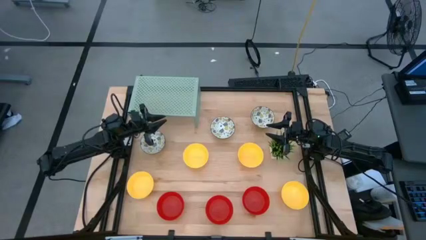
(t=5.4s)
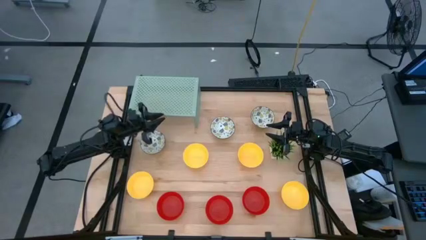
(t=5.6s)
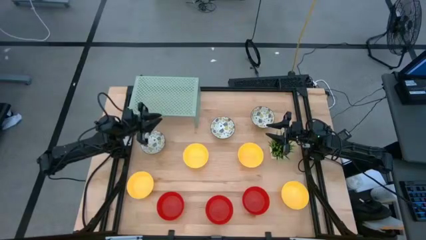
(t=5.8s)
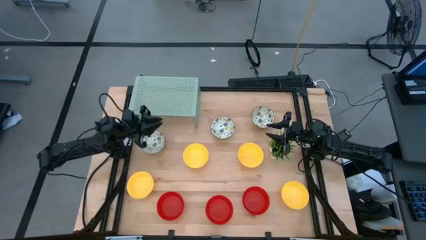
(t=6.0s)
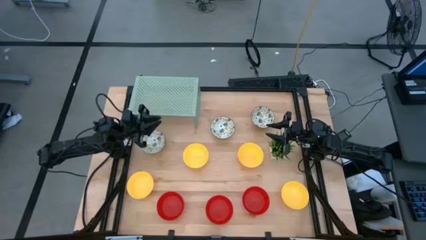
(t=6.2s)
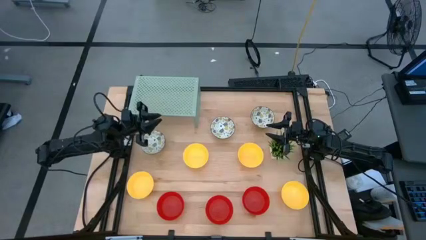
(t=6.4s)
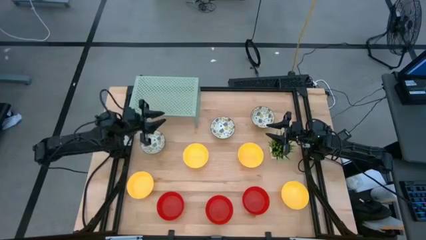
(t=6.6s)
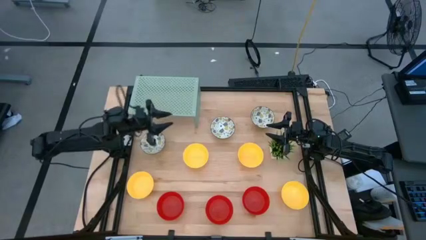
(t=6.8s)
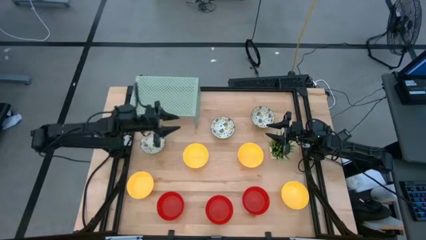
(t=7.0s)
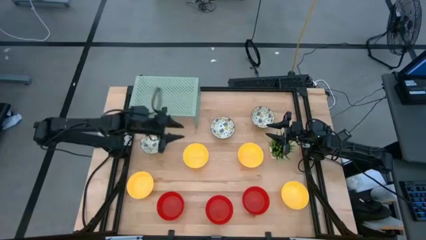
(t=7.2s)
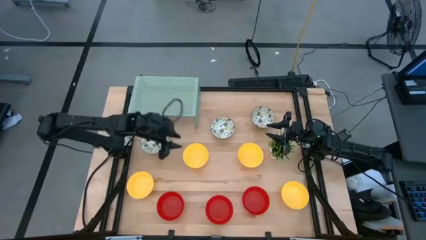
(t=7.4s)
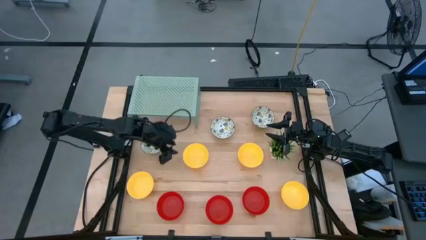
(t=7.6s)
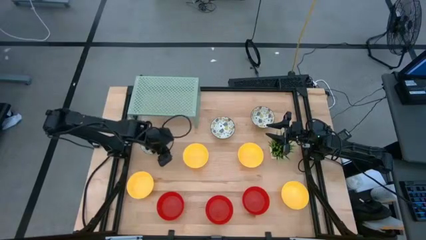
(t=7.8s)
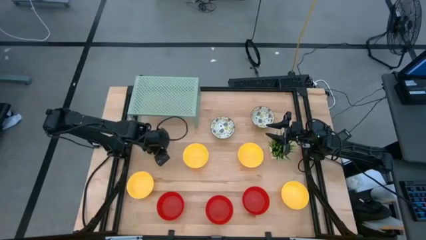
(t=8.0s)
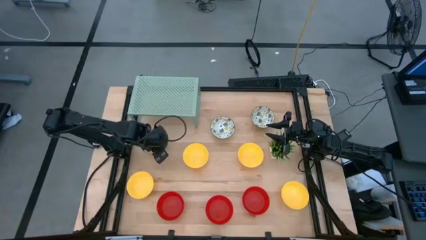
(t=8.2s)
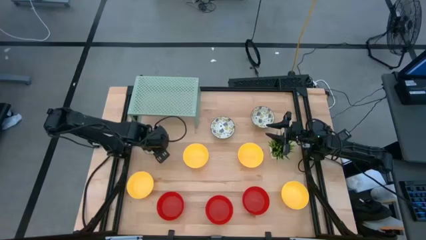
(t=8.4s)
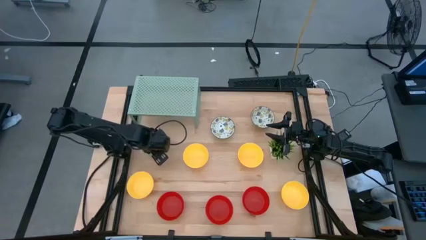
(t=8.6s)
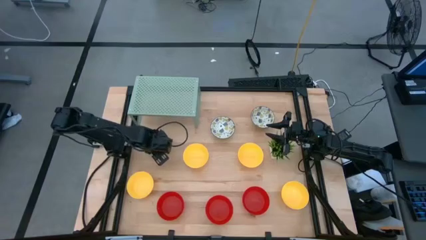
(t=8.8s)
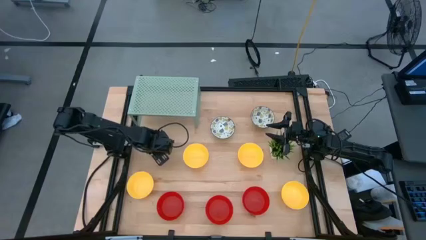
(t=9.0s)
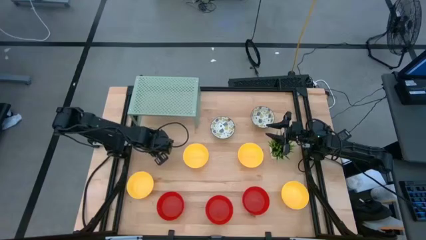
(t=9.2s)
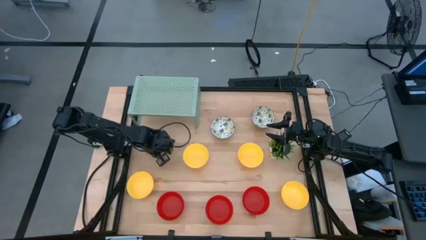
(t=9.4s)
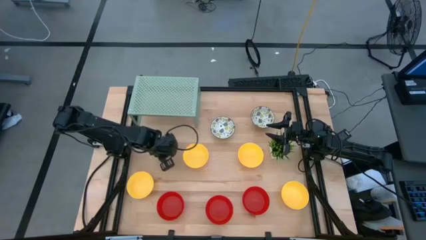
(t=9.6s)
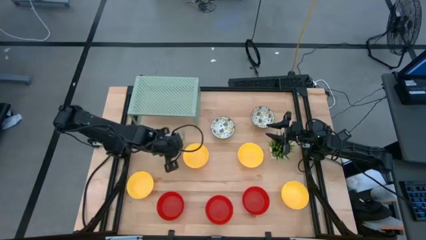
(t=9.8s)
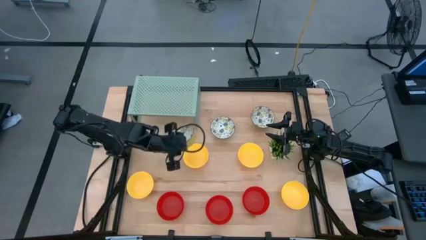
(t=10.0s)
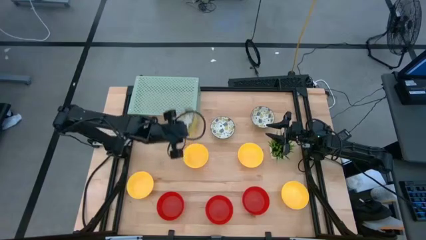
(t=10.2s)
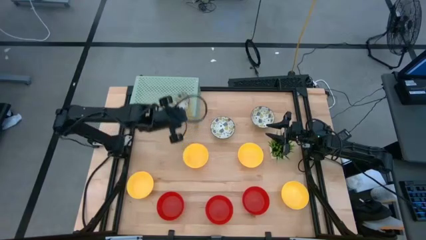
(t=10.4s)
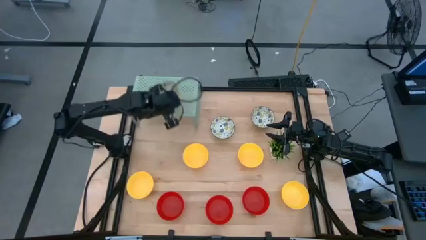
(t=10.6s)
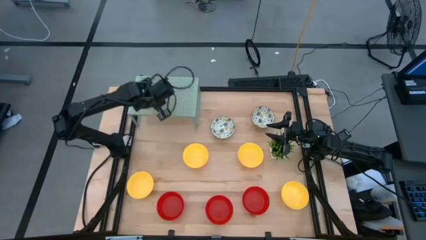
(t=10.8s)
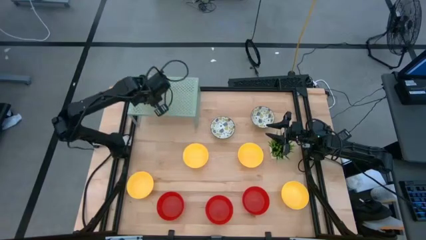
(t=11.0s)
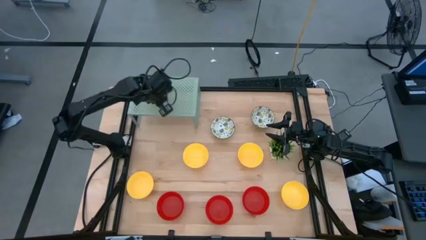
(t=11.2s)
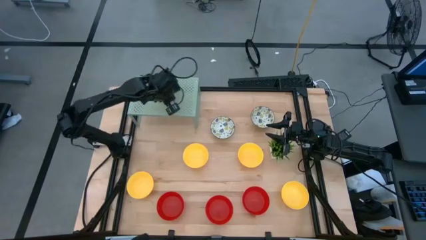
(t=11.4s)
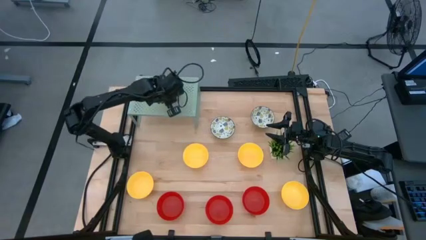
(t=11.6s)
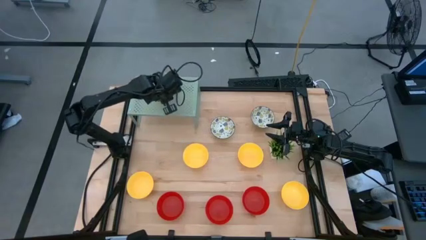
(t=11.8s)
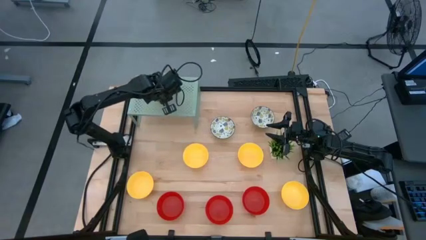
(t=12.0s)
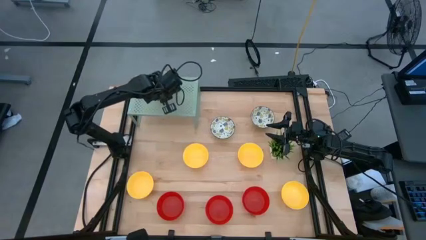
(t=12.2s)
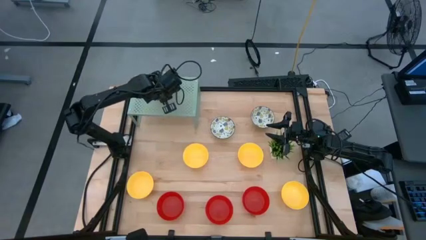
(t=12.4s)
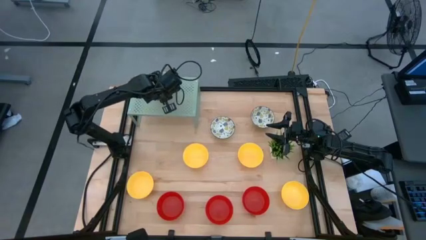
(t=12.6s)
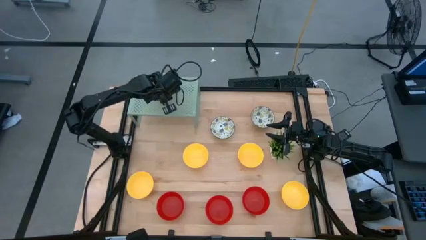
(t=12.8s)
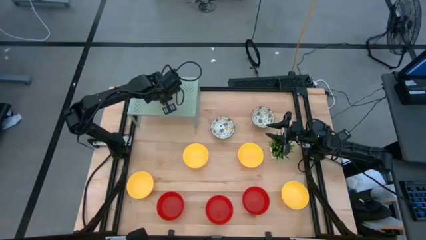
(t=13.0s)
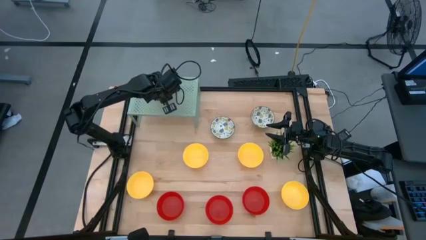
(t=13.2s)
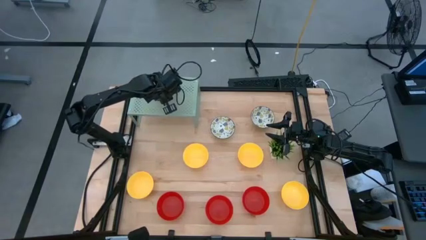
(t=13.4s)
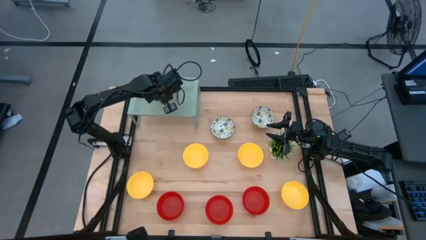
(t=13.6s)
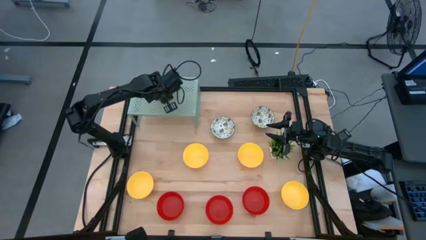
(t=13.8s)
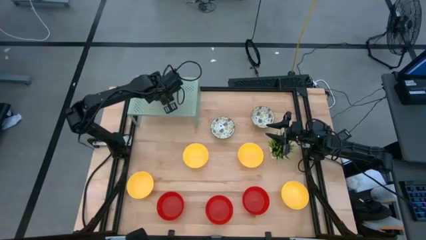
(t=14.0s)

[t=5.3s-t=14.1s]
Task: Pick & Place Mini bowls
Put the white bowl on the shelf

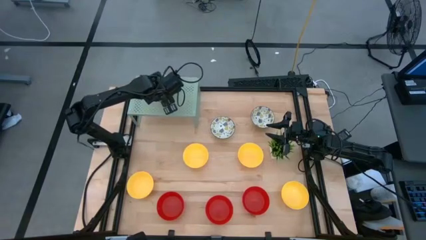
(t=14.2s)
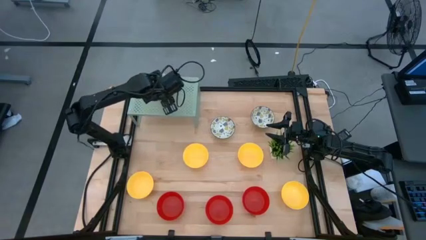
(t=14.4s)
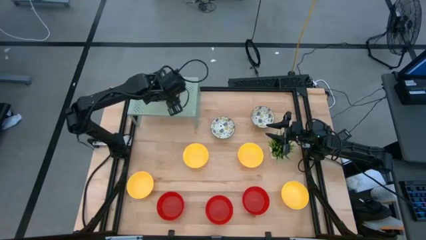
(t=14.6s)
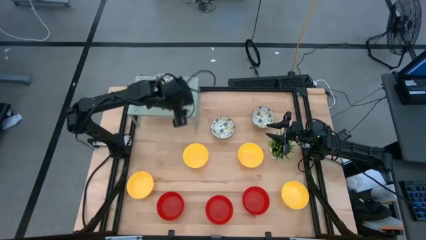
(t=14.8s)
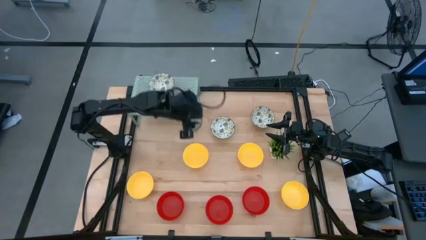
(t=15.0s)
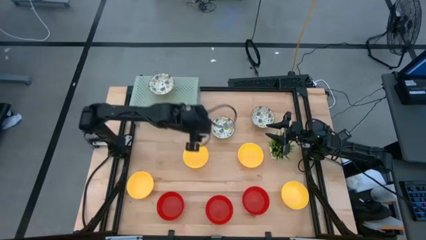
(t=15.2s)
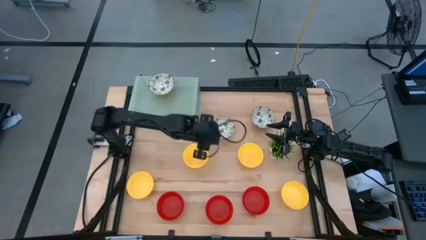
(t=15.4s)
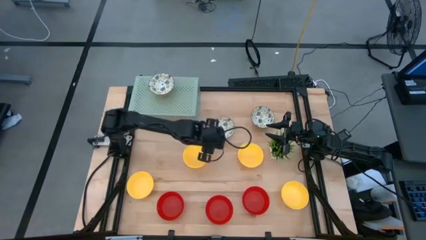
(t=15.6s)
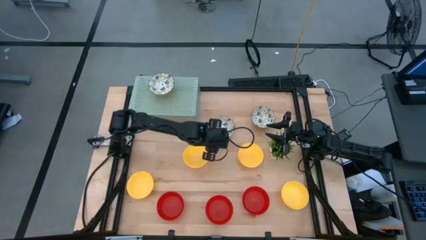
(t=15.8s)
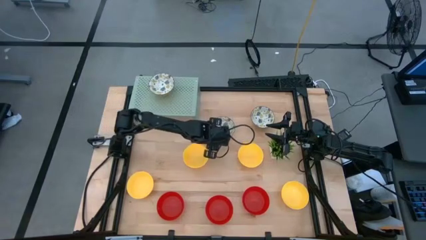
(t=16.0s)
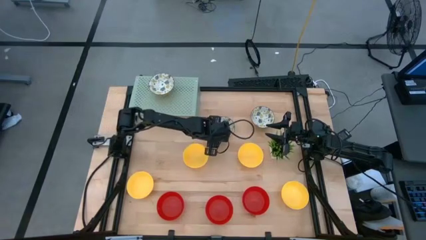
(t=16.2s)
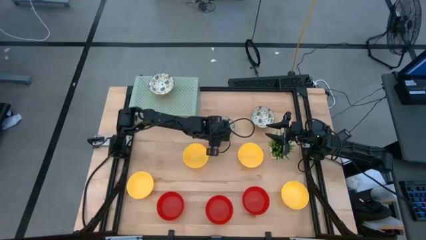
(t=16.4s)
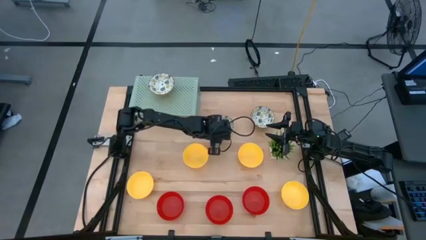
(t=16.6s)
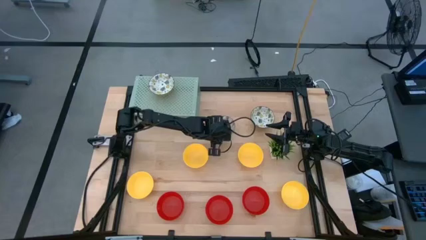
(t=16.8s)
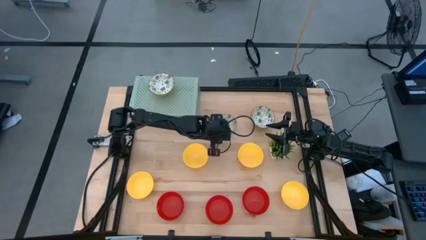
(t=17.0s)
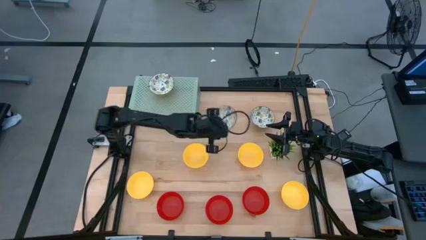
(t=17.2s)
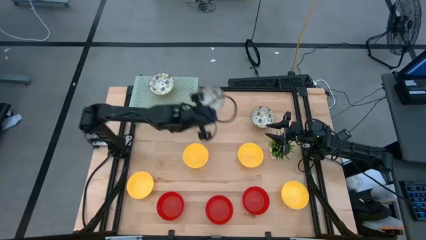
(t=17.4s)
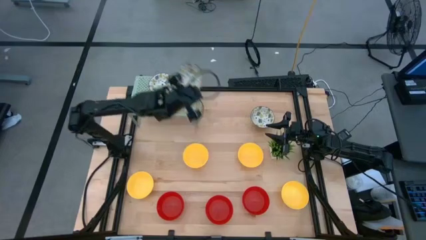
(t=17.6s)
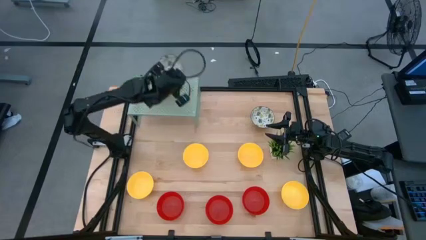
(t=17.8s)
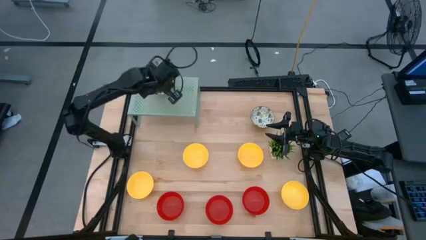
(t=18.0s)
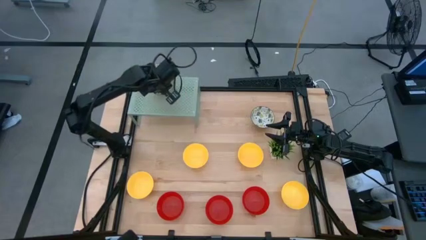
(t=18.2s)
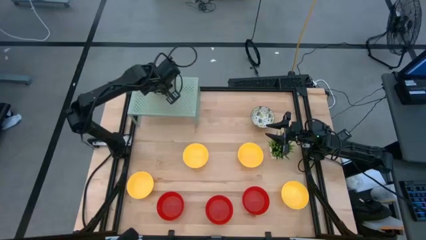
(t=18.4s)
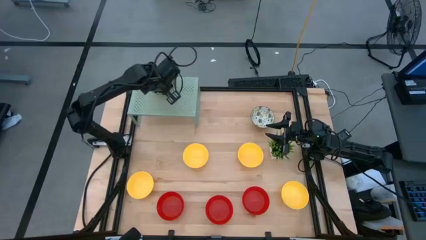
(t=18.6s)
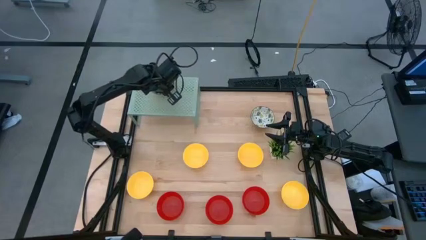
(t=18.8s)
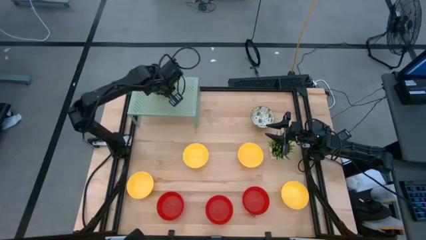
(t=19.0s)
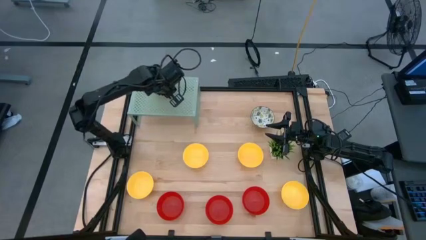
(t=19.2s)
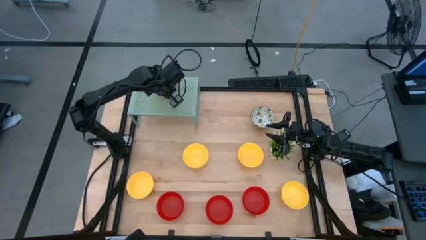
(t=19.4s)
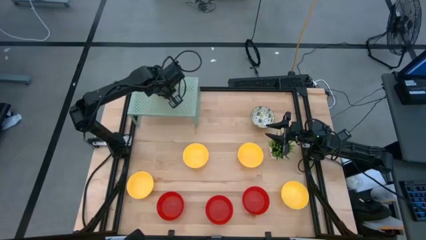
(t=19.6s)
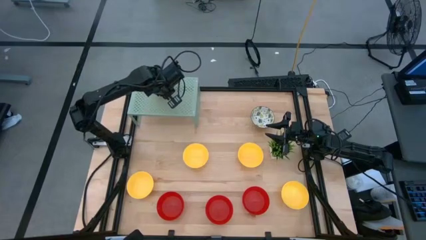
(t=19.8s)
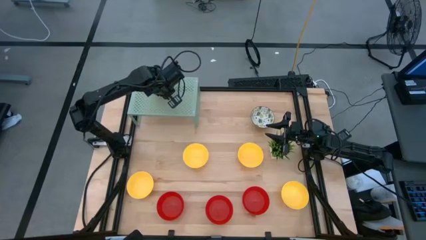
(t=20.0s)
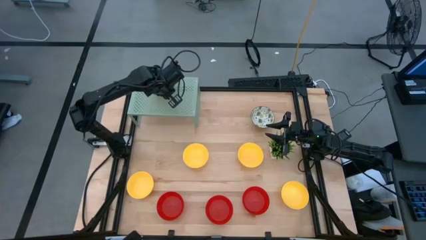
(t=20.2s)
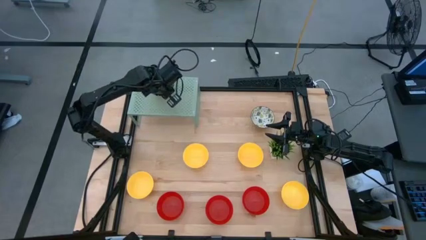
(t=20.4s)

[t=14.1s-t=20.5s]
Stack the white bowl on the white bowl on the shelf

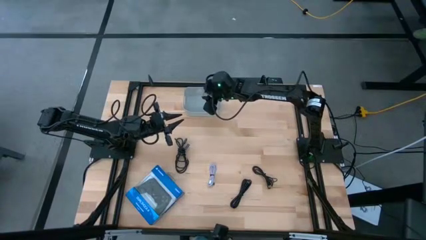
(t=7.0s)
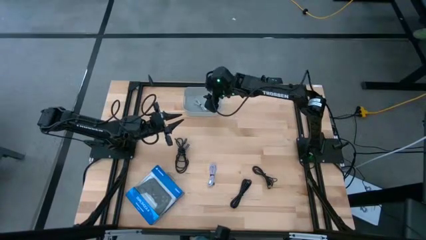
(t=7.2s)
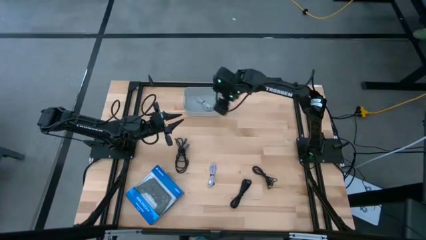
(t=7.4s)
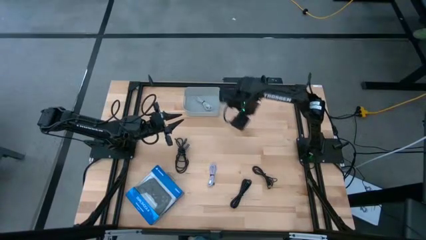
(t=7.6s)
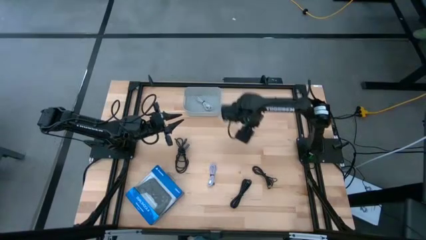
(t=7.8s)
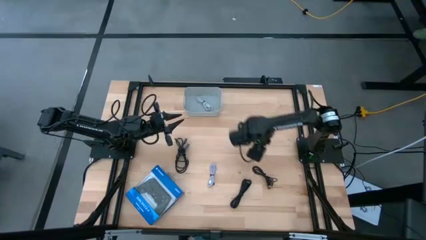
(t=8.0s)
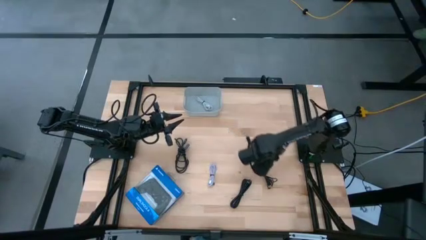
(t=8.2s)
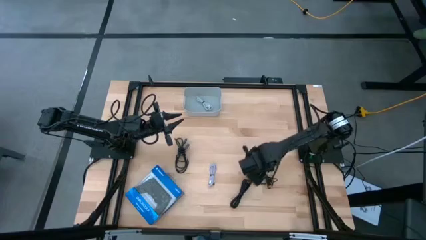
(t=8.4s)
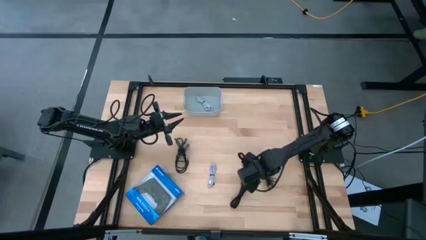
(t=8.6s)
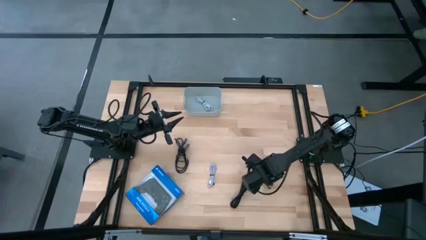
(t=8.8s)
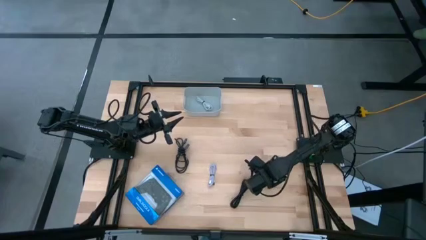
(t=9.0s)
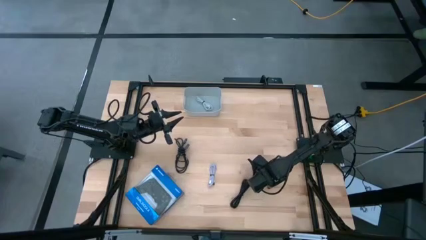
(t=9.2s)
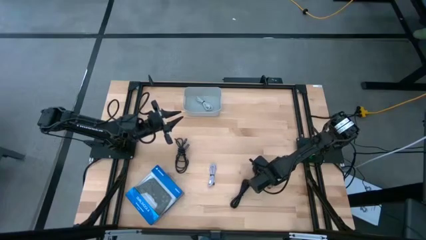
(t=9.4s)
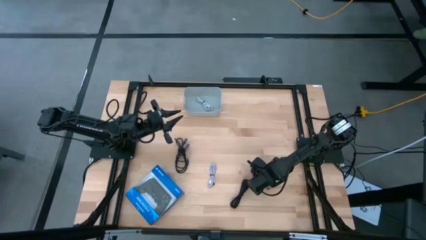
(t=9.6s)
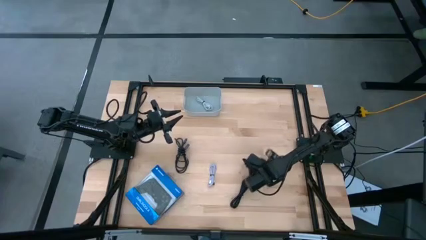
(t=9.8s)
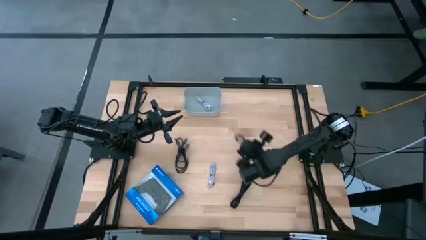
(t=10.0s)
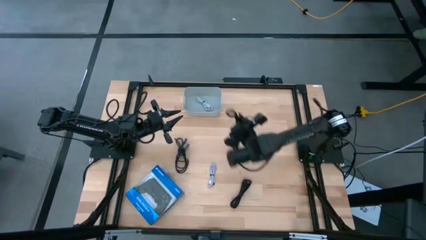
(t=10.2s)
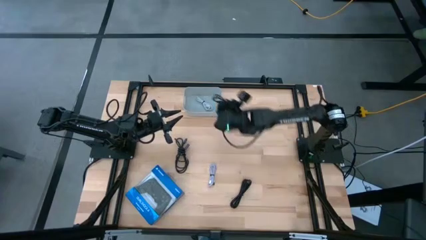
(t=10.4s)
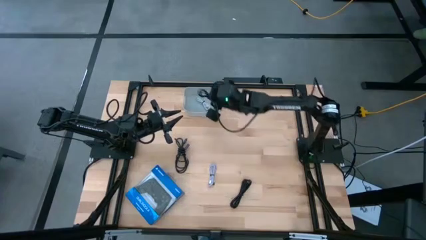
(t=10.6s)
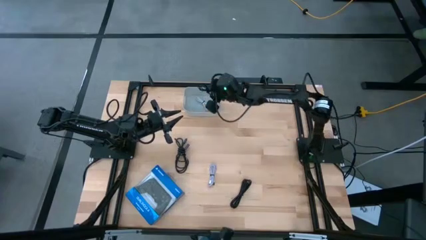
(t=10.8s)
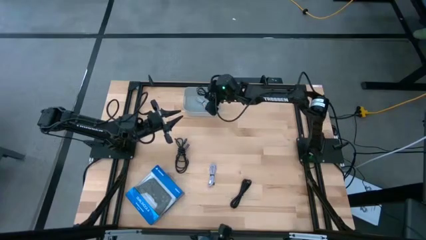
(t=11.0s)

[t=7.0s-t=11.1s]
Task: Pick and place USB-C Cables
Put the middle black charger cable into the white bin
